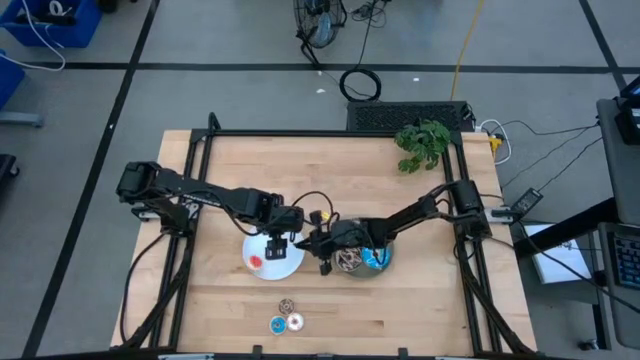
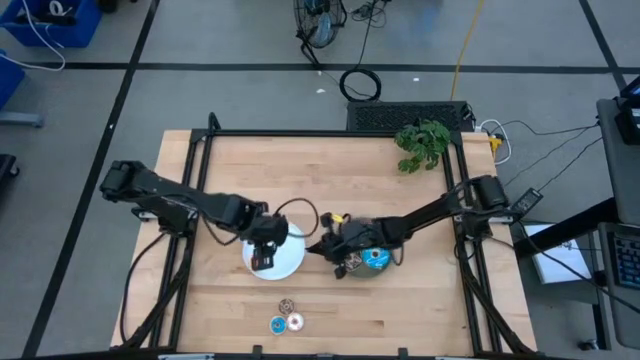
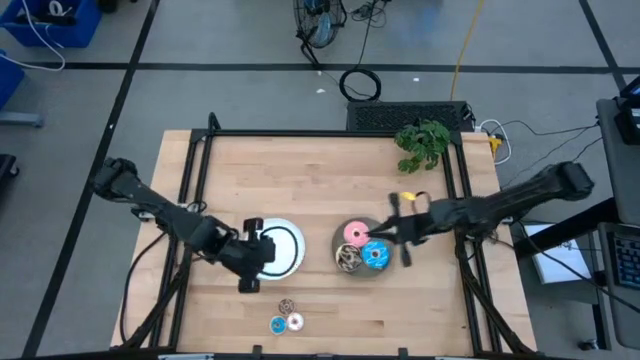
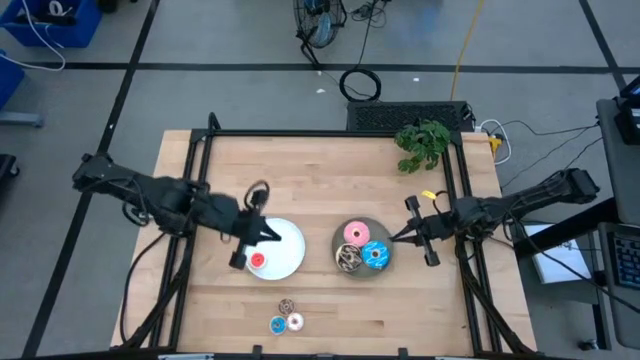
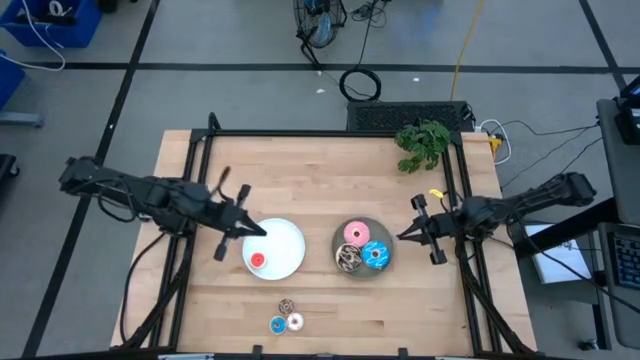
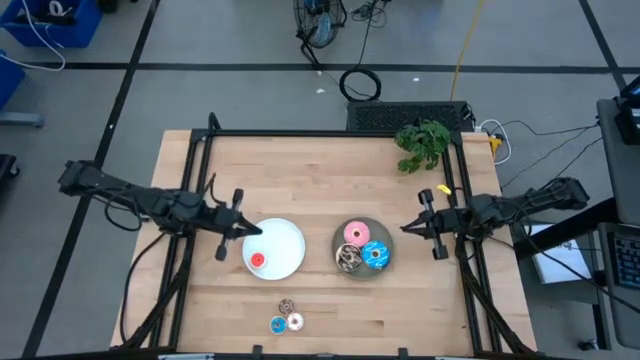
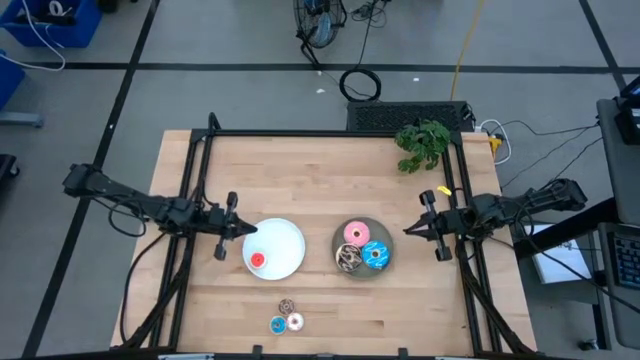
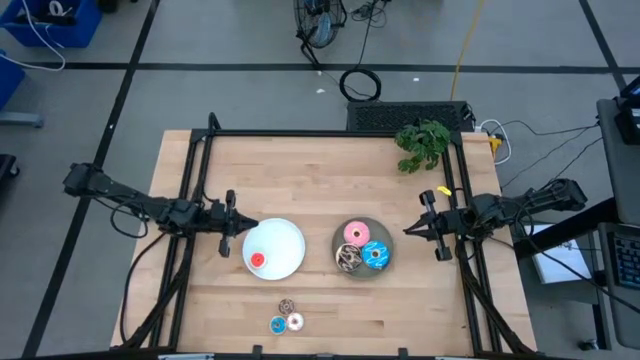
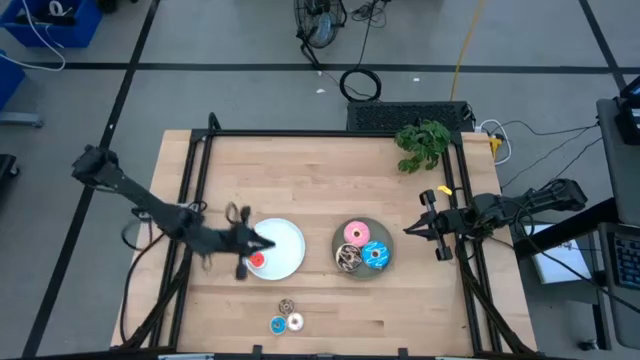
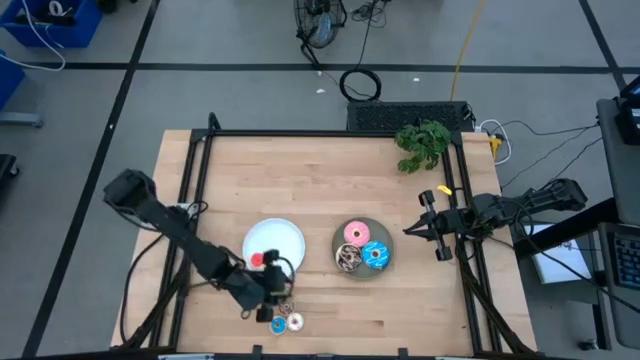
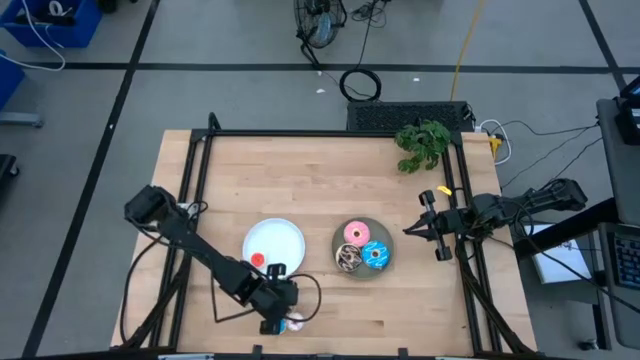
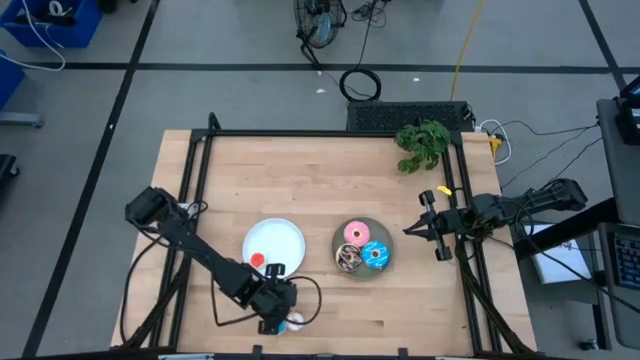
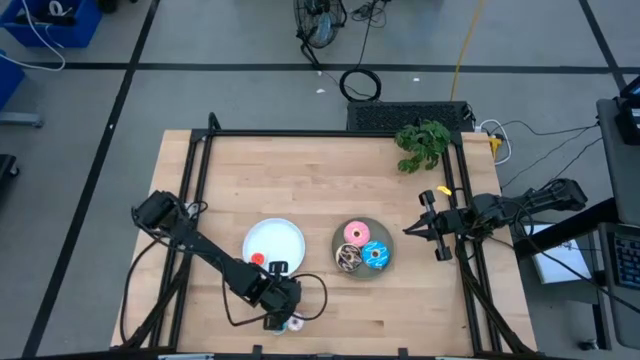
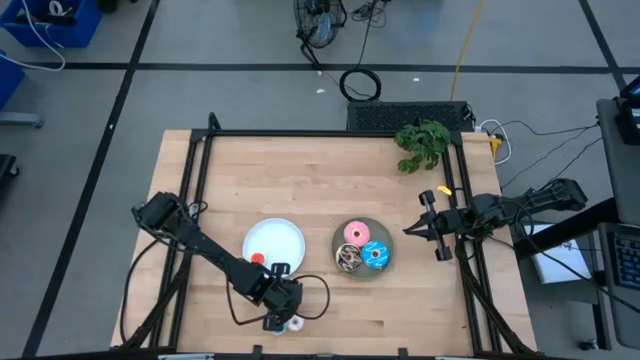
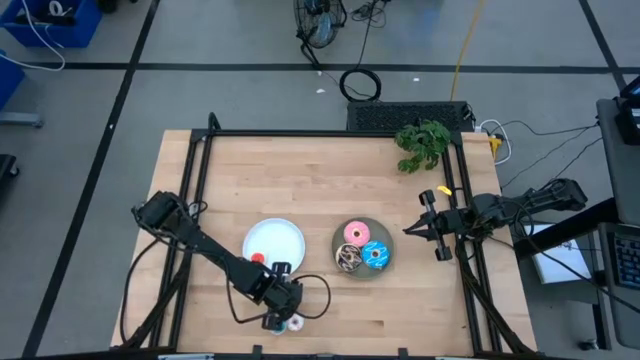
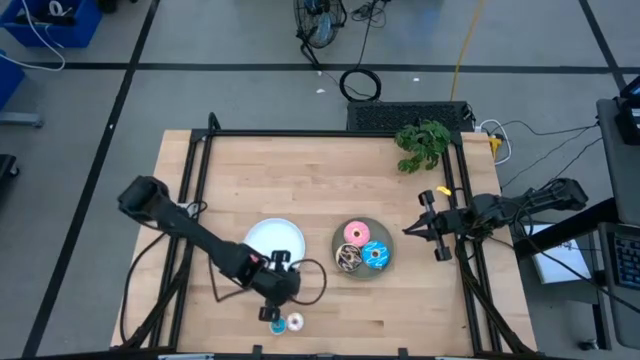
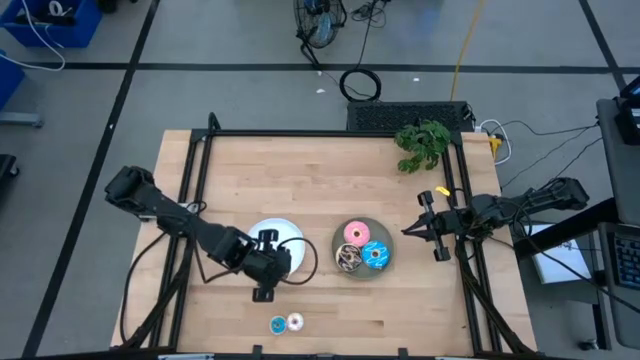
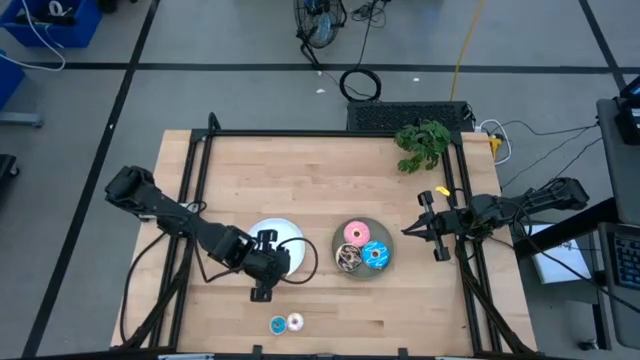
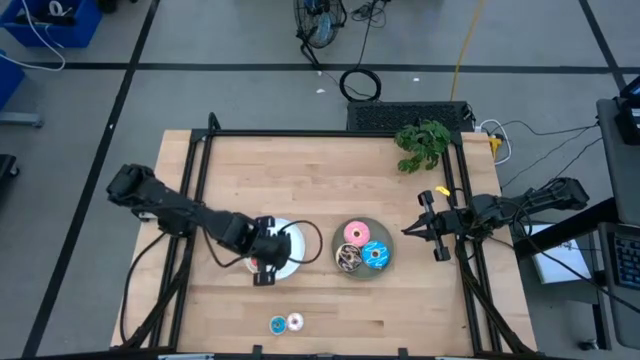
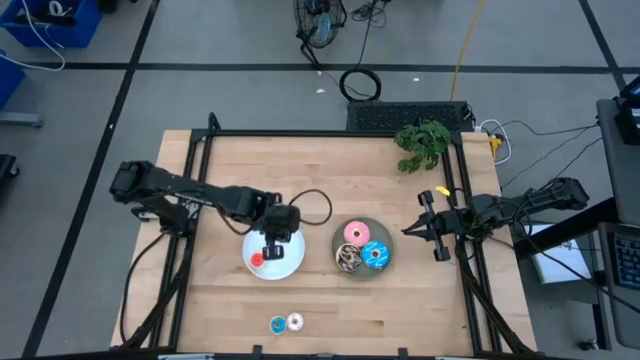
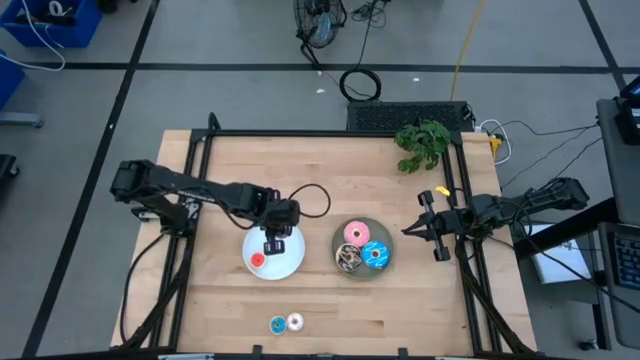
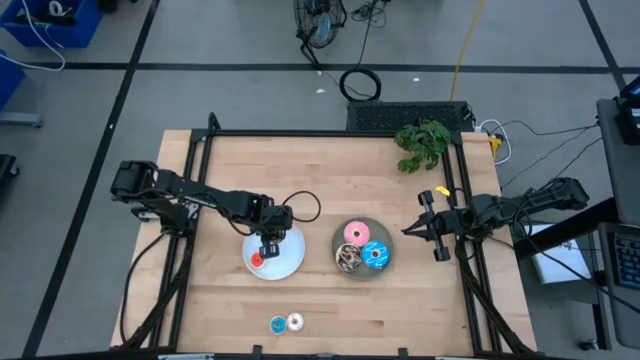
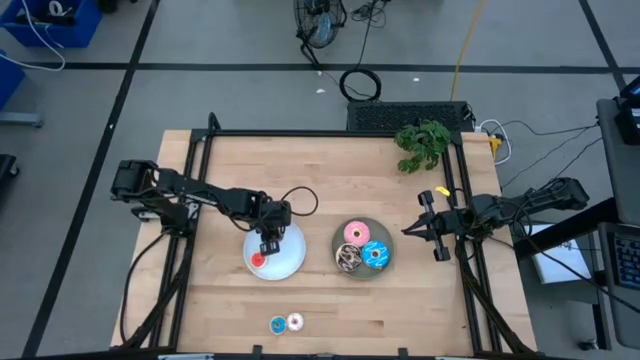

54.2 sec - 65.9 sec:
Task: Pick & Place donuts
Put the small brown donut on the white plate

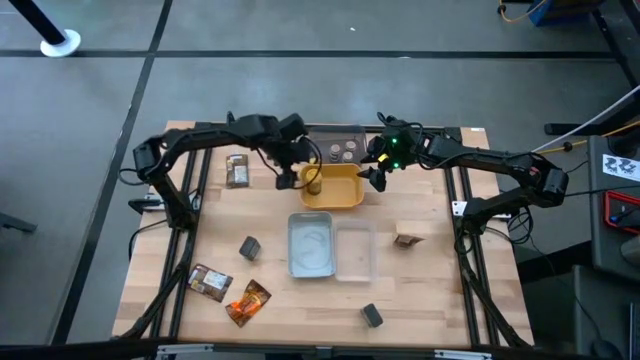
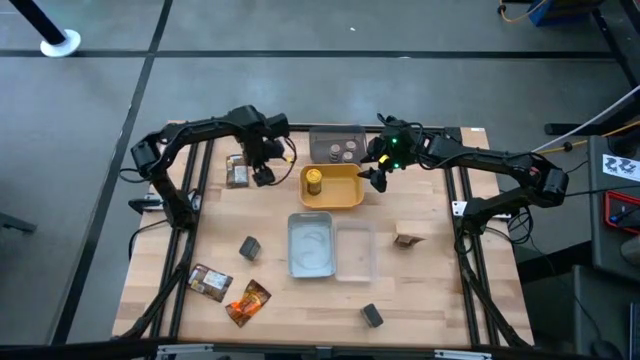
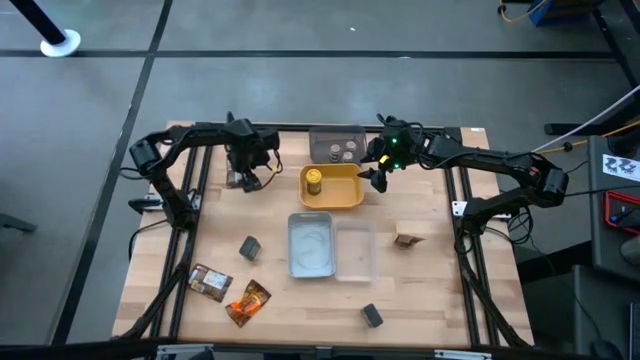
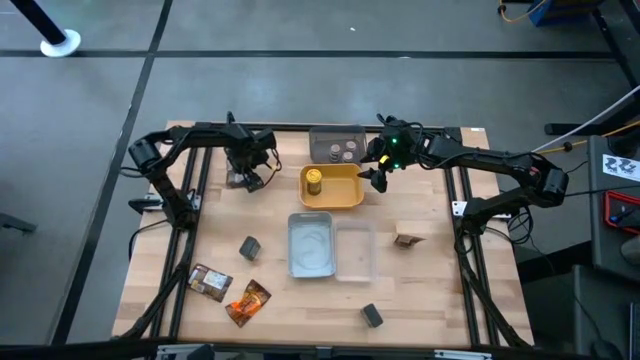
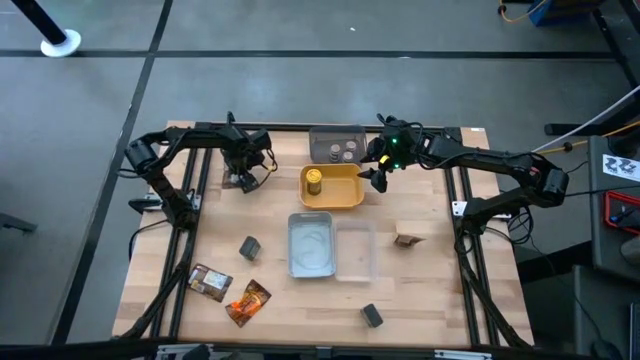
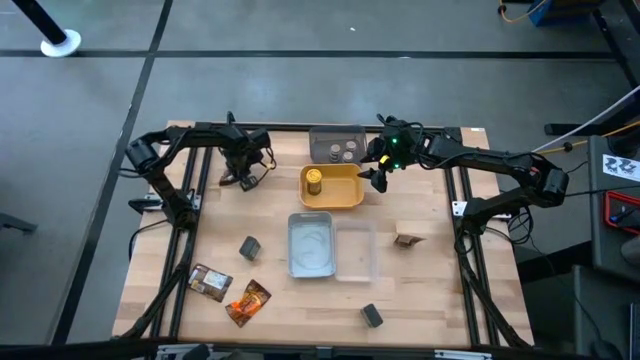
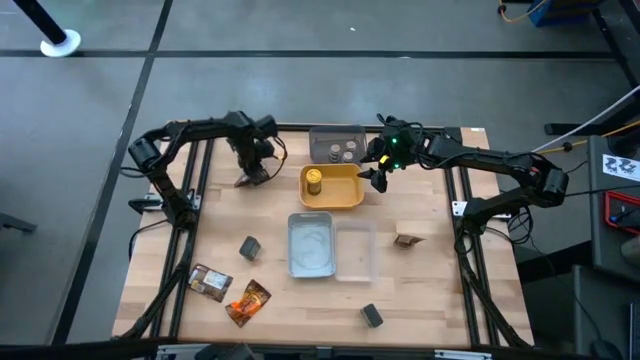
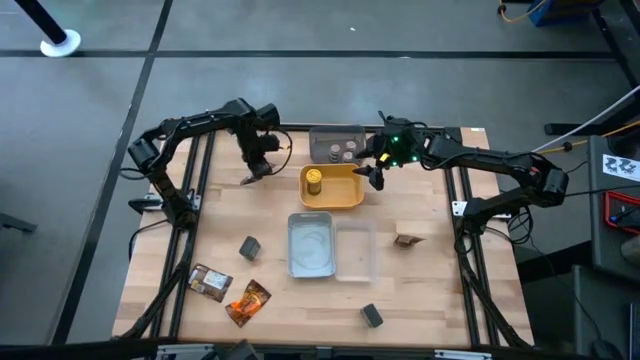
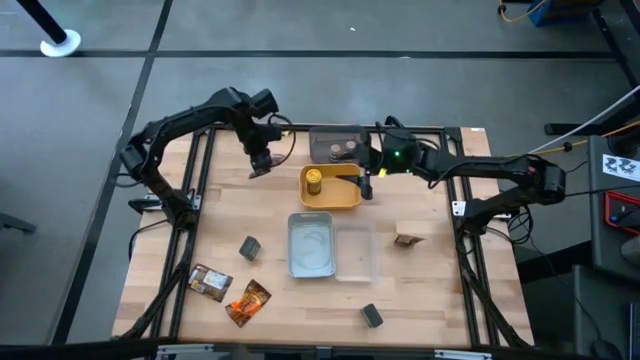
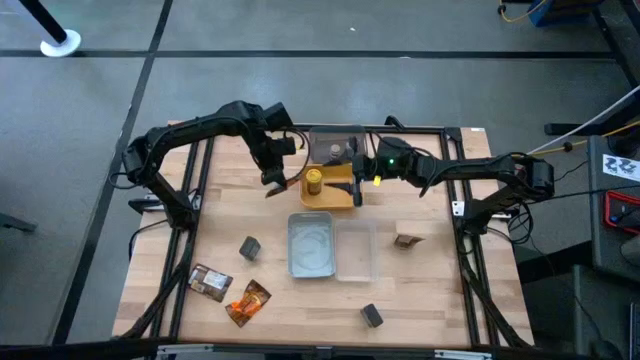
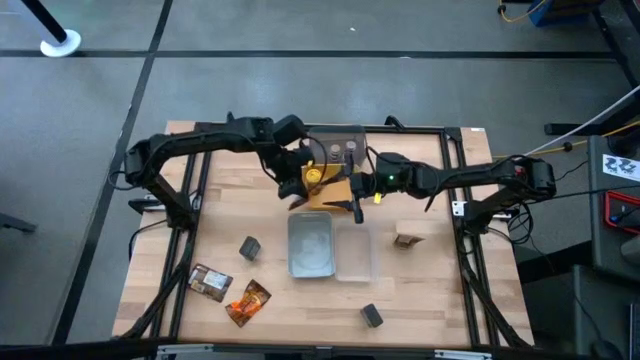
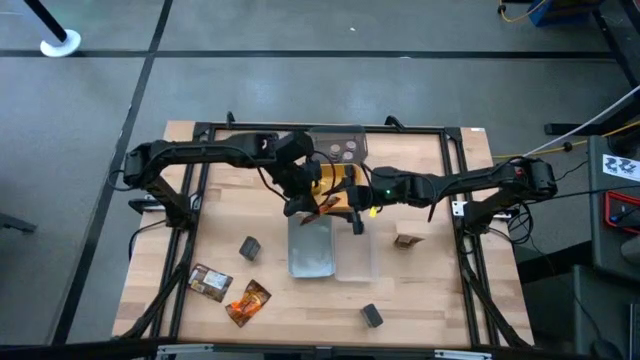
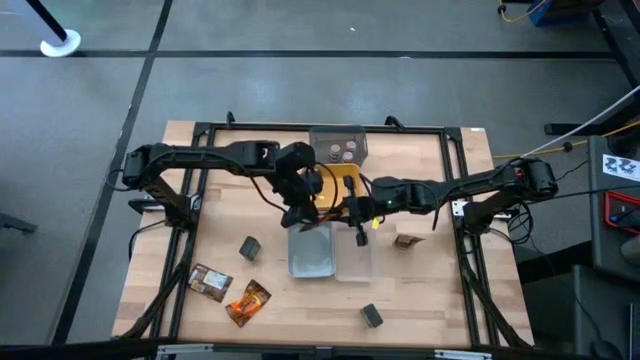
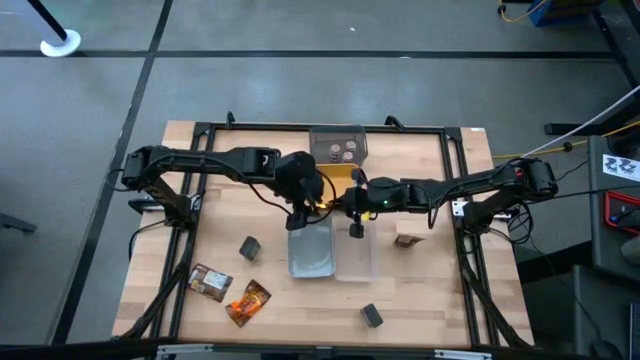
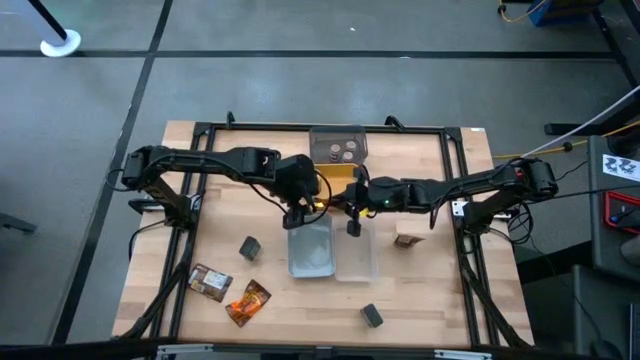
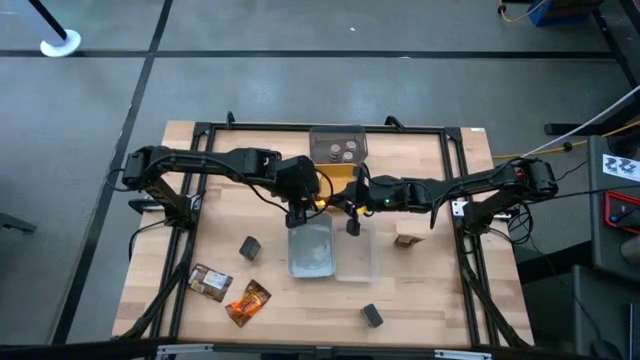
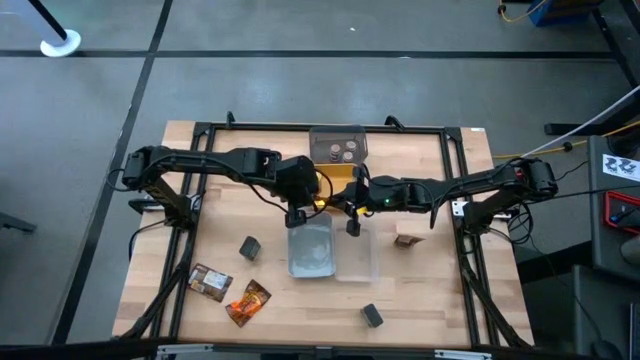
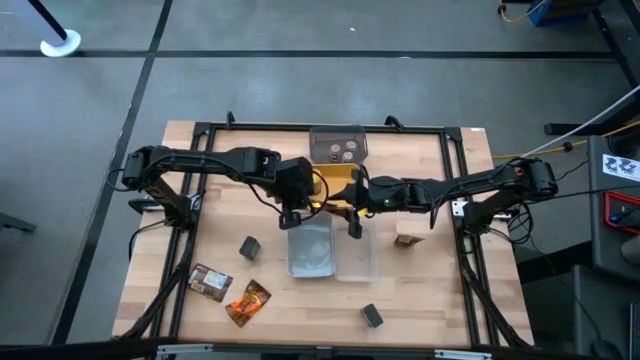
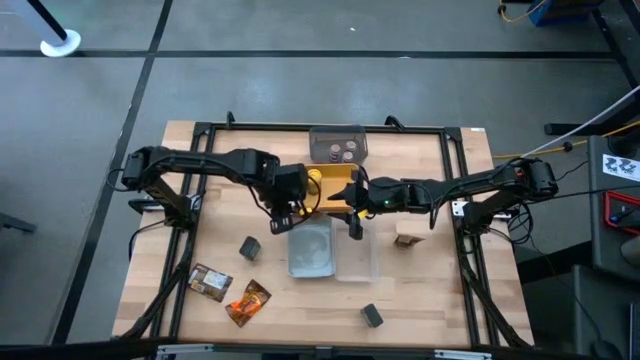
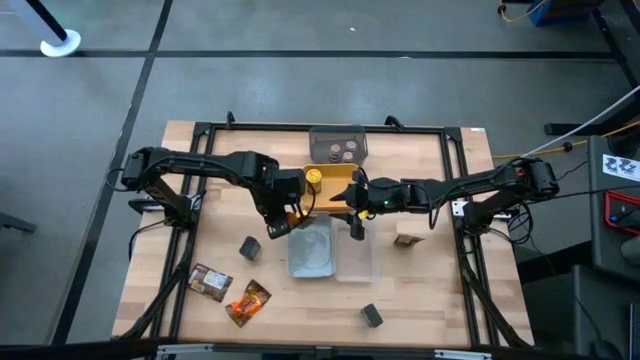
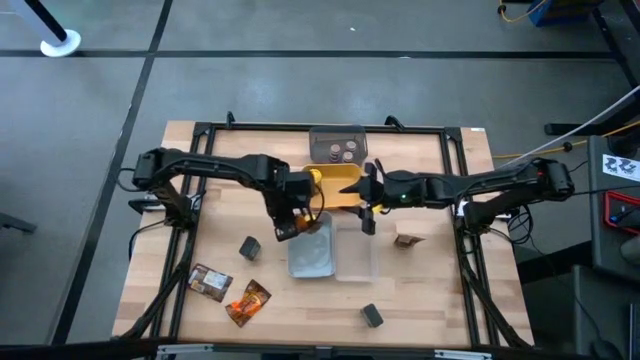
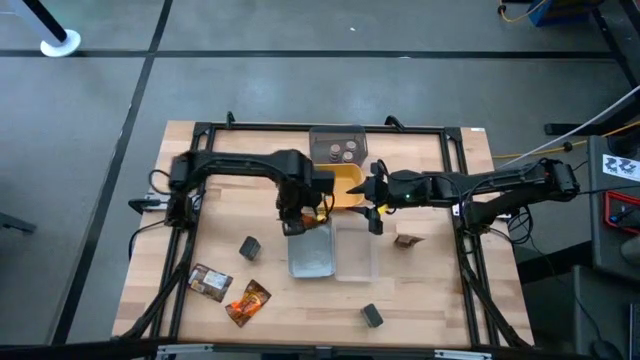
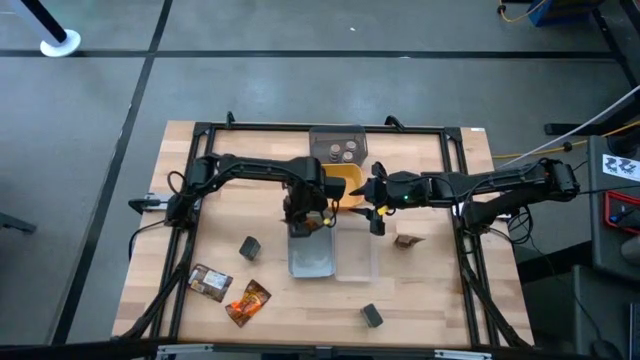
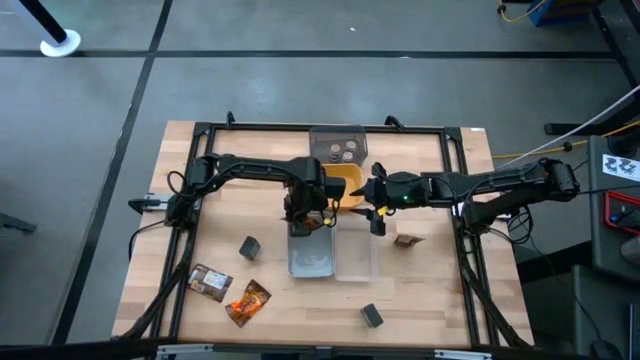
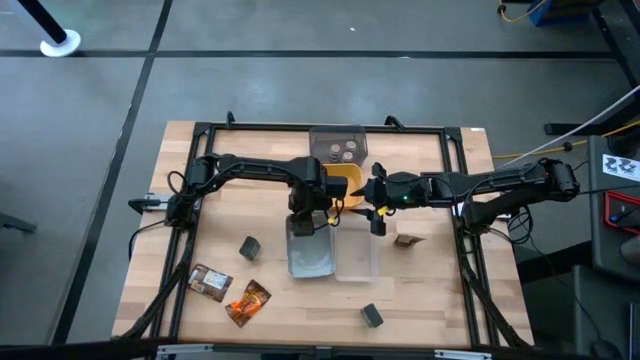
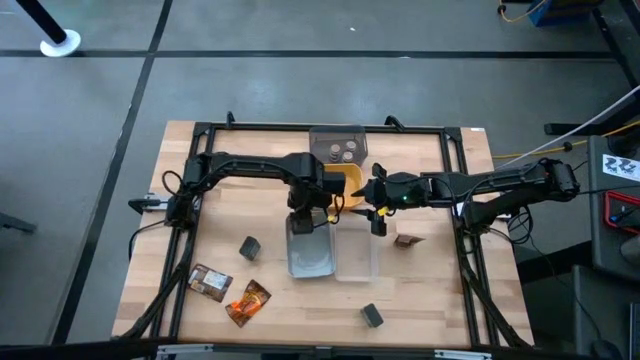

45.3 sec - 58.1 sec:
Task: Sort spices by type
Put the top left brown seasoning pack into the gray bin
